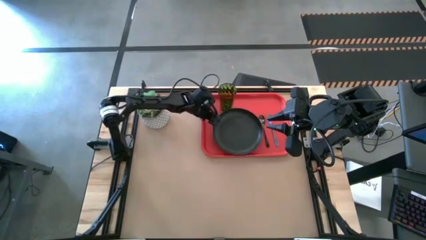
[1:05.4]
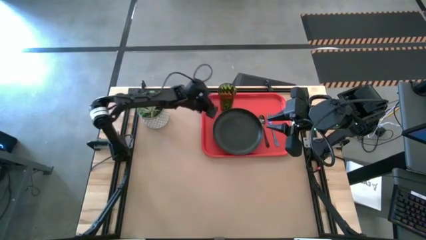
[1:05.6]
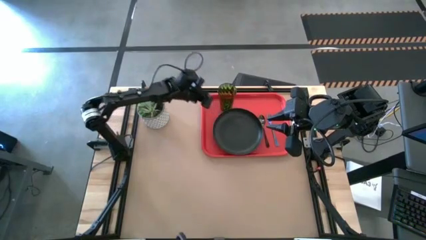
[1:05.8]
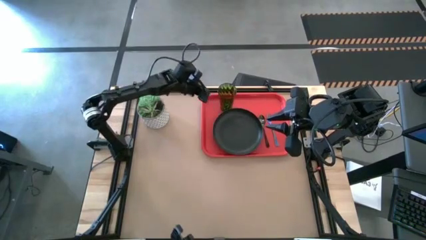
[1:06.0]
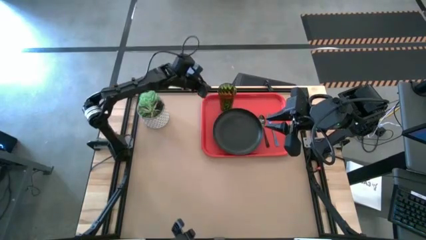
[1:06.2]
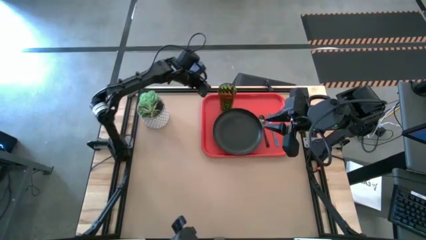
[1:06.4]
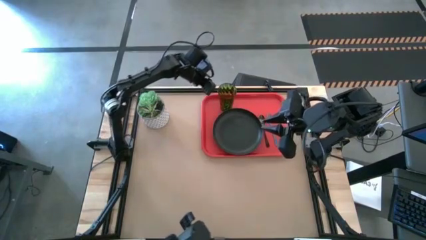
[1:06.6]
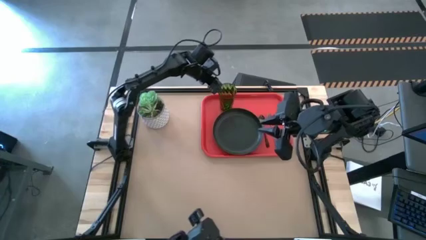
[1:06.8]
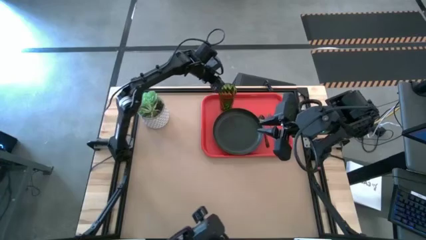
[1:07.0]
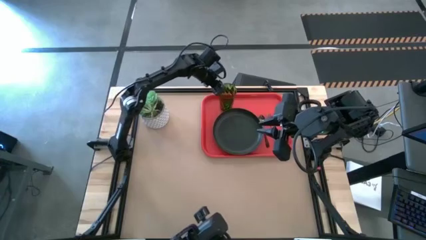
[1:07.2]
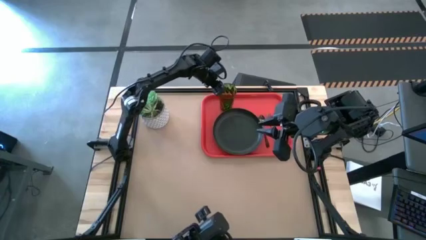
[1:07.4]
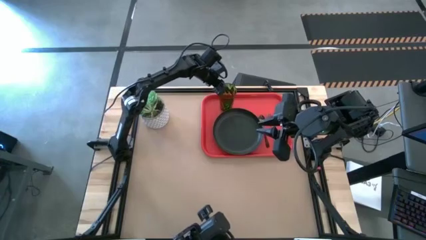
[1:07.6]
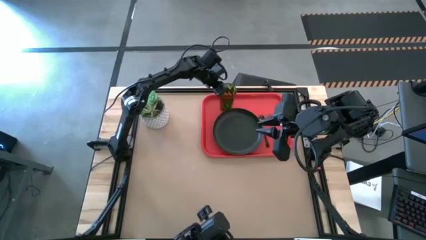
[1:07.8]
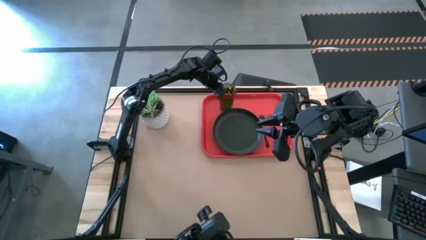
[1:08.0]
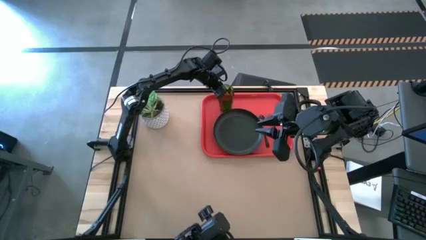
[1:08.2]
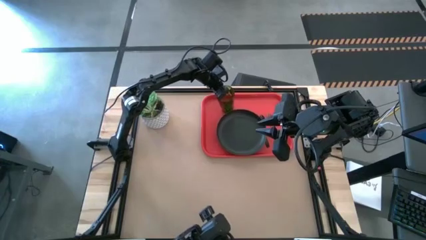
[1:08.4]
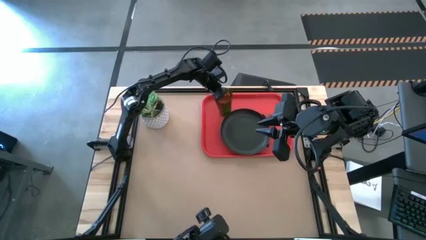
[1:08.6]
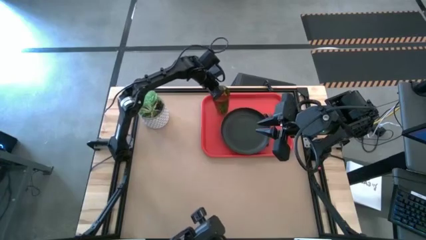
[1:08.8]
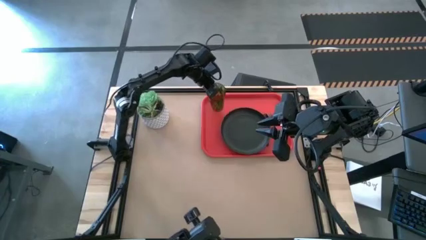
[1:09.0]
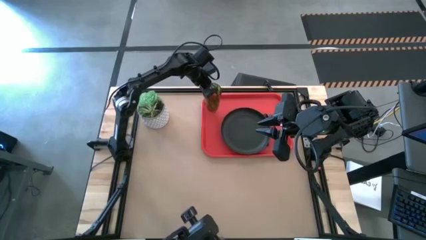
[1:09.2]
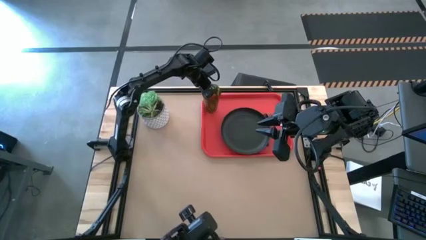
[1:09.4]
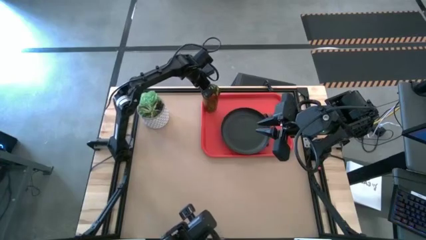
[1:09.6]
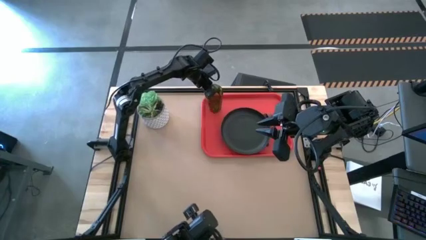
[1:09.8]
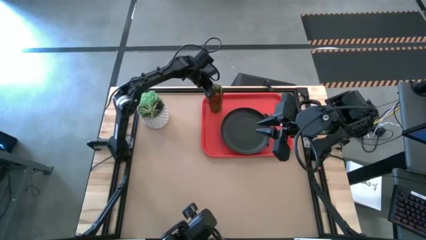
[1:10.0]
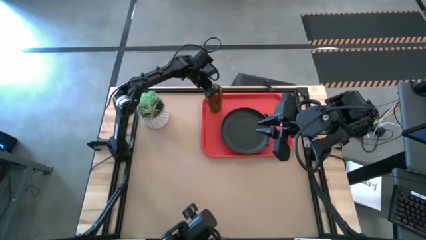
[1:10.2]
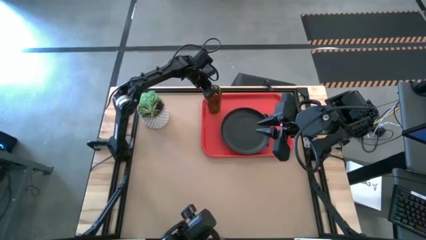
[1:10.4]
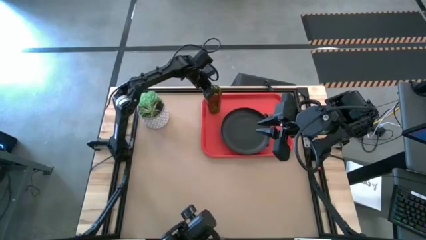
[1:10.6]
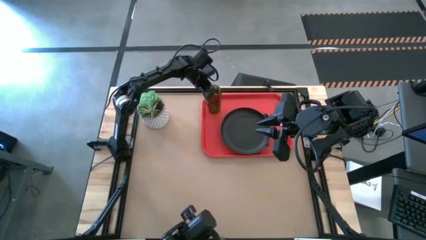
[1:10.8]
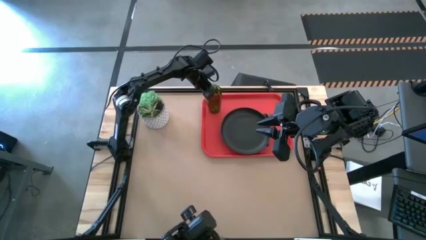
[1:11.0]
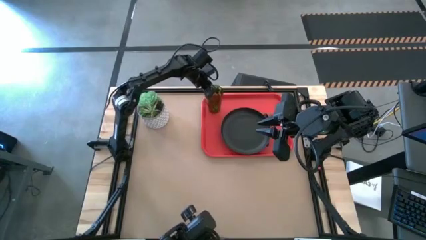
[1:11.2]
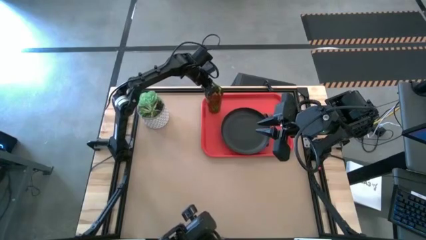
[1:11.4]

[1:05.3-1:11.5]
Task: Pick and place plate/cup/fork/spoon on tray
Adjust the green cup on the red tray

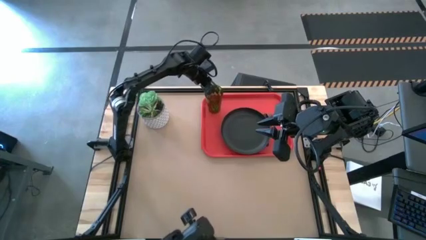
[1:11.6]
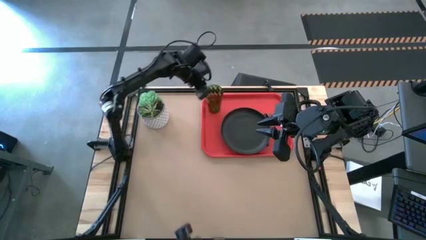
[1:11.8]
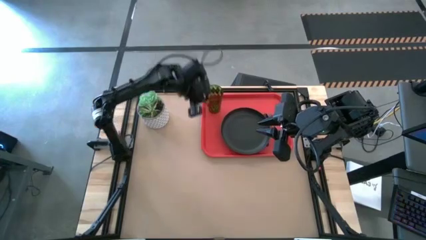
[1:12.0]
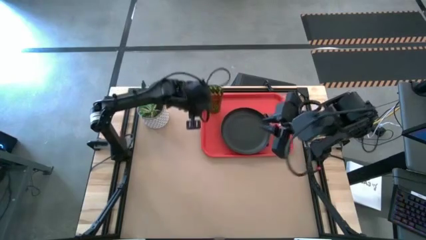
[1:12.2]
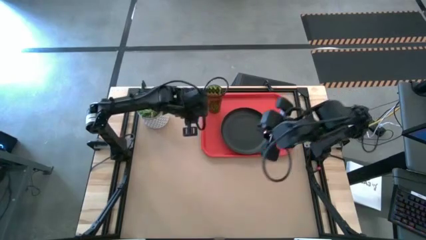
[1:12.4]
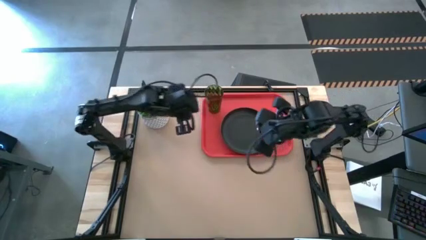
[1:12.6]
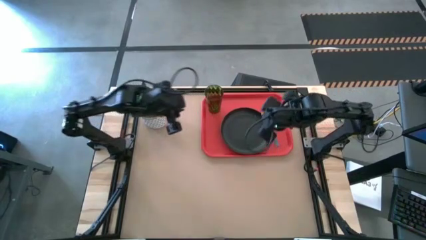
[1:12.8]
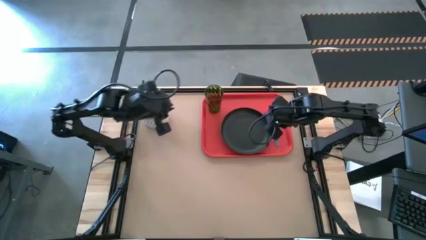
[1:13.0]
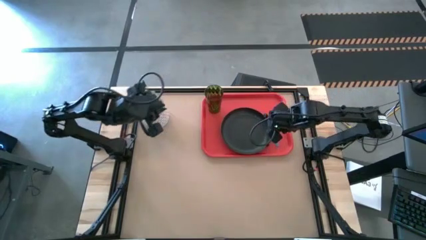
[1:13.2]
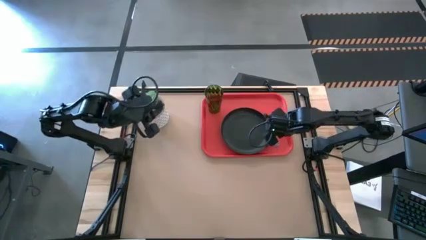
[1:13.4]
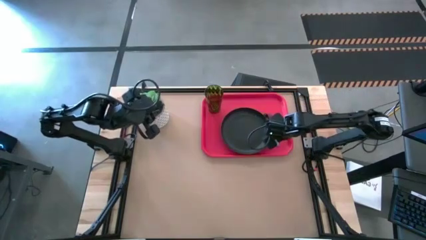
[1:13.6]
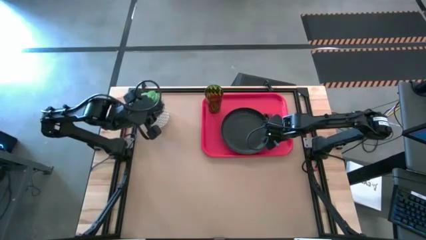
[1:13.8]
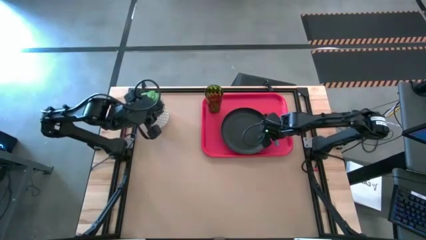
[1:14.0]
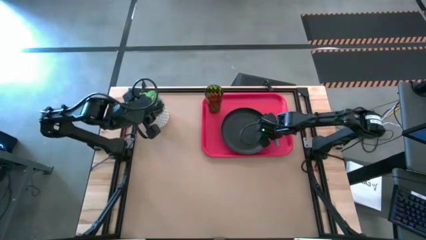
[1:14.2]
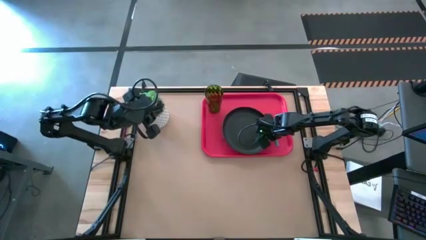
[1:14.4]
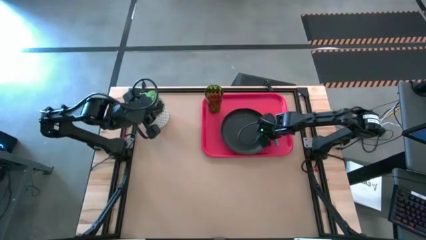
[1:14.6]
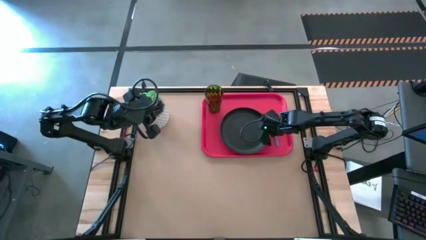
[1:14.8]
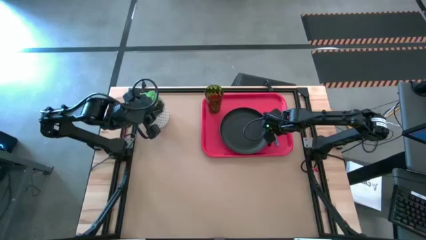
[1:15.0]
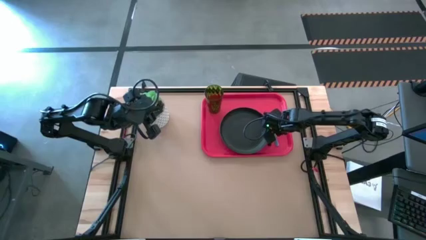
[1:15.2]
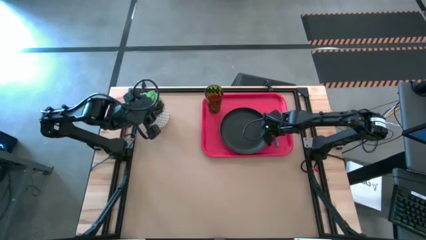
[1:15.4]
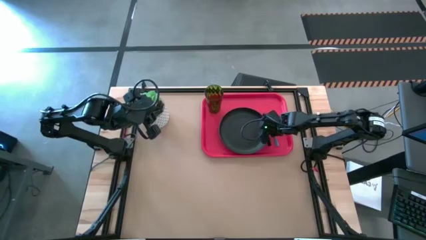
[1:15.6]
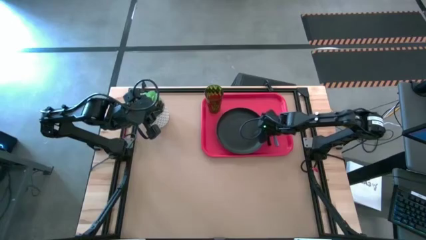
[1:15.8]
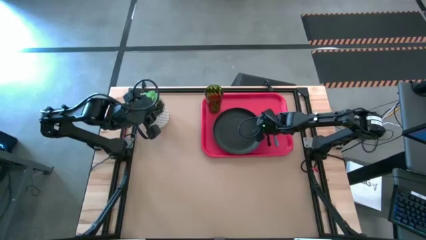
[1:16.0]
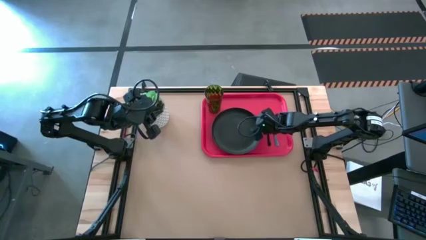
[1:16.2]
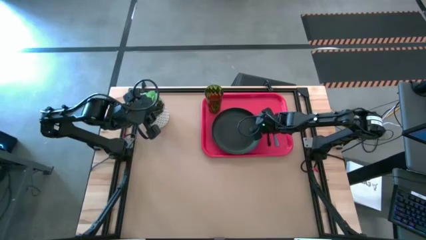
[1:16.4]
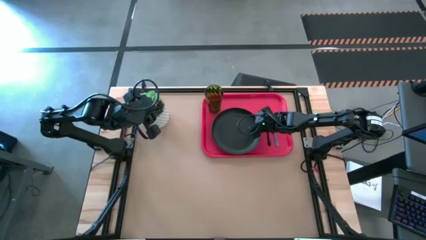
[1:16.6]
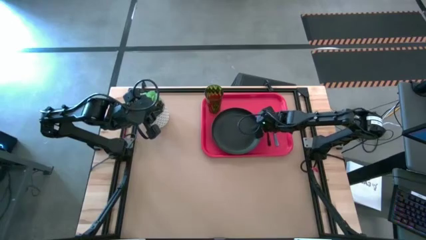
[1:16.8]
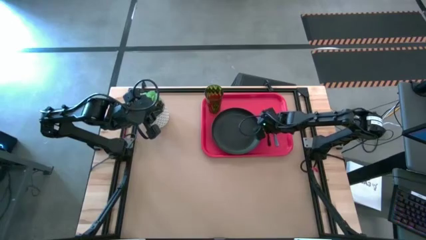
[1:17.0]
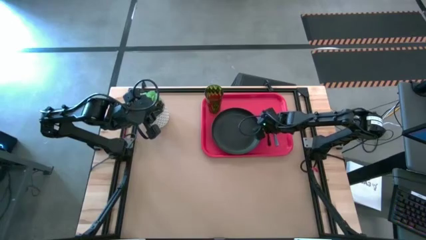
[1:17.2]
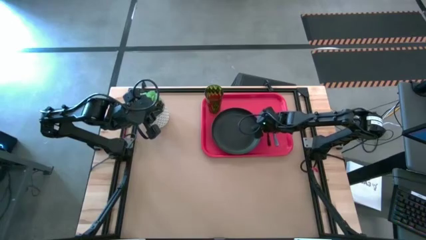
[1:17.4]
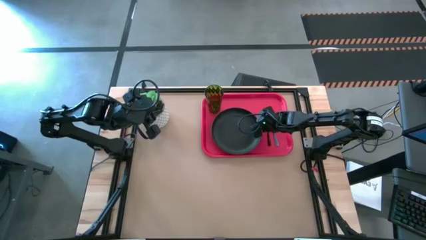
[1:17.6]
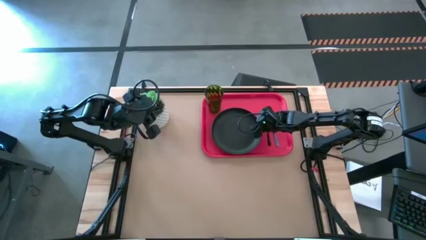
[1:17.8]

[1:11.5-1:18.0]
Adjust the black plate on the red tray
